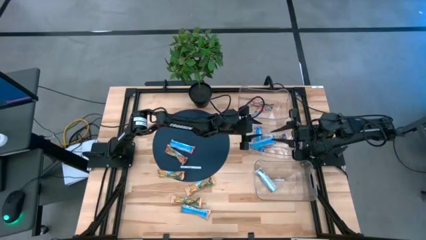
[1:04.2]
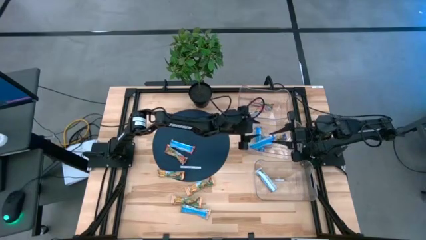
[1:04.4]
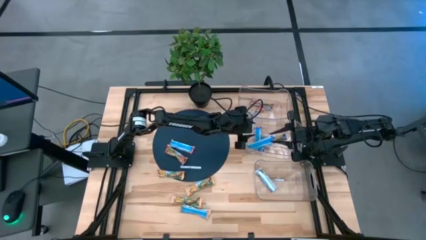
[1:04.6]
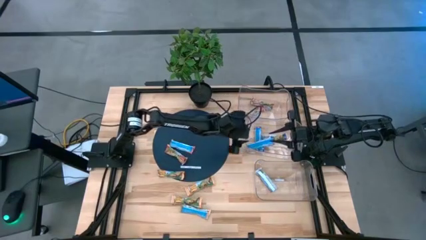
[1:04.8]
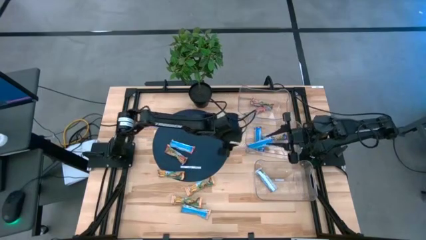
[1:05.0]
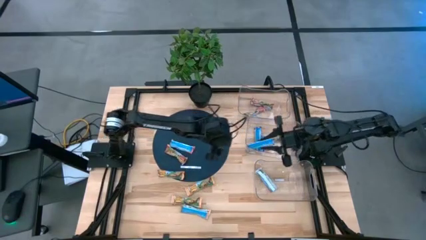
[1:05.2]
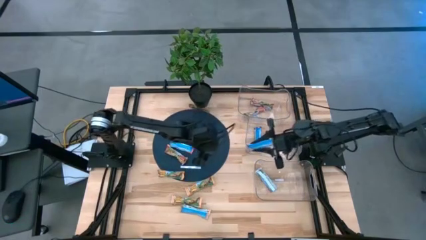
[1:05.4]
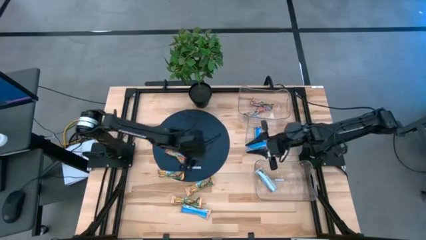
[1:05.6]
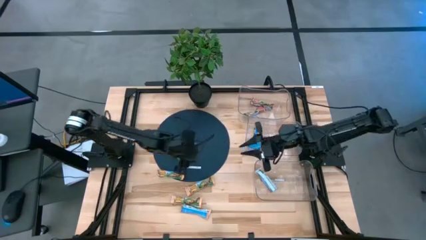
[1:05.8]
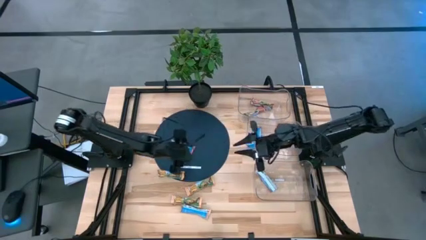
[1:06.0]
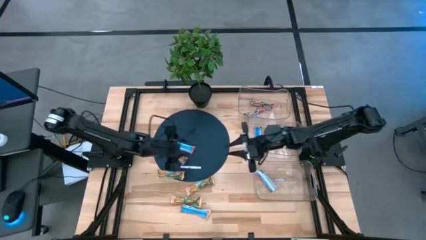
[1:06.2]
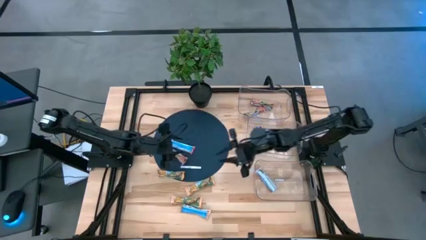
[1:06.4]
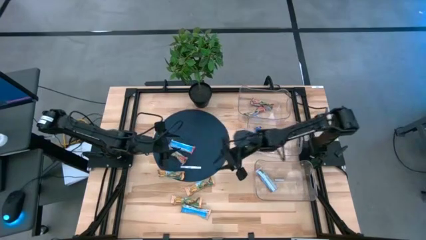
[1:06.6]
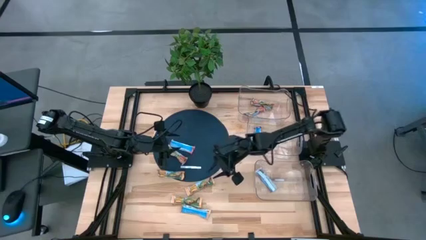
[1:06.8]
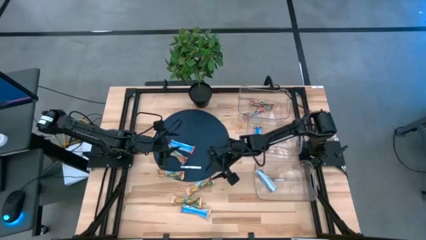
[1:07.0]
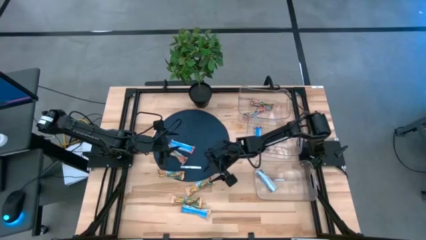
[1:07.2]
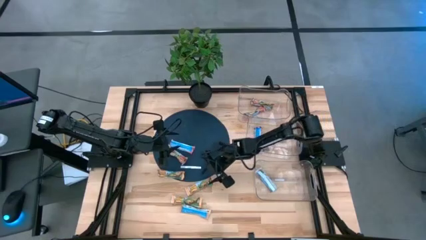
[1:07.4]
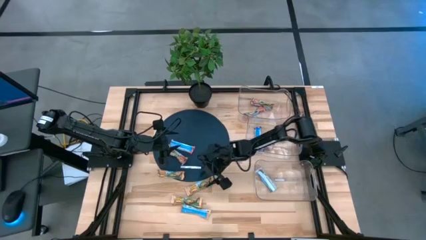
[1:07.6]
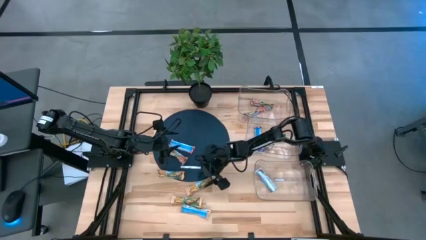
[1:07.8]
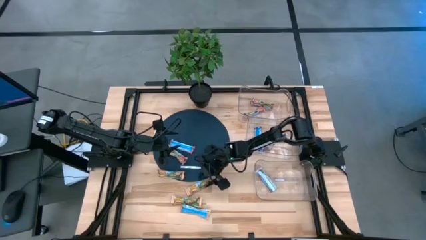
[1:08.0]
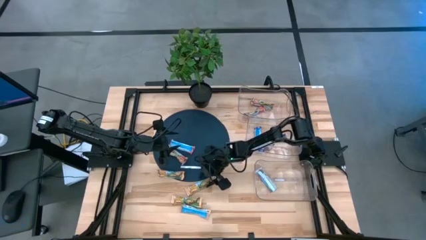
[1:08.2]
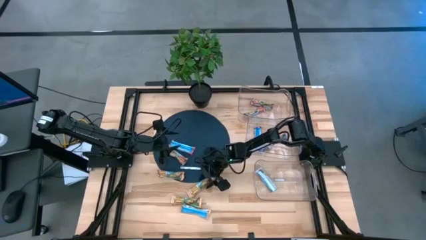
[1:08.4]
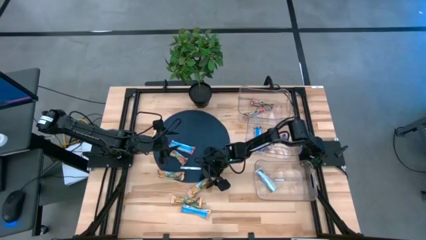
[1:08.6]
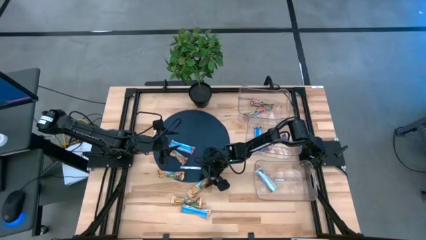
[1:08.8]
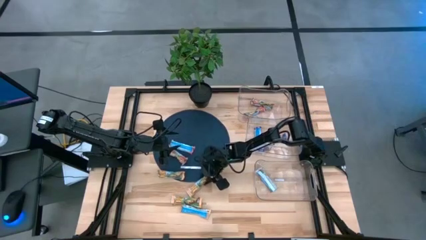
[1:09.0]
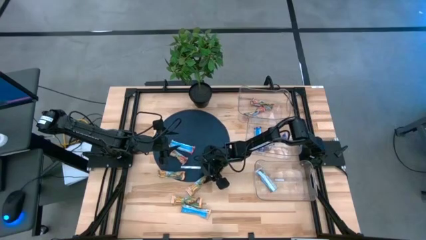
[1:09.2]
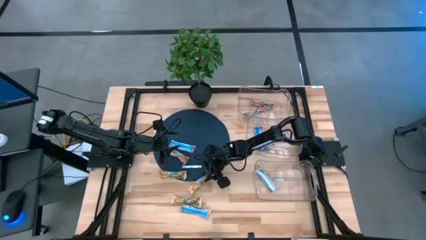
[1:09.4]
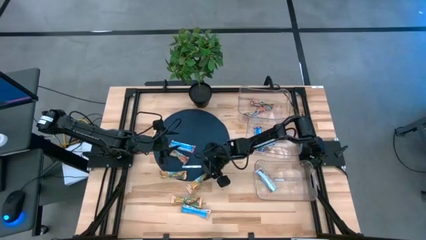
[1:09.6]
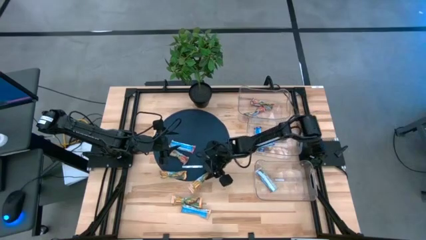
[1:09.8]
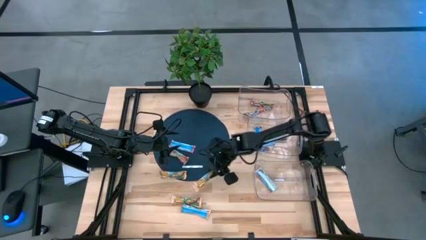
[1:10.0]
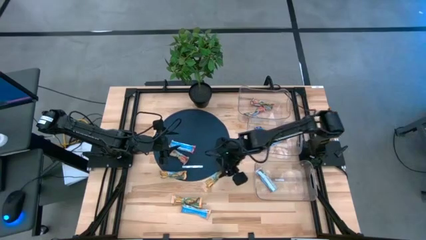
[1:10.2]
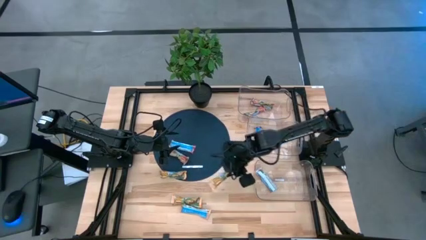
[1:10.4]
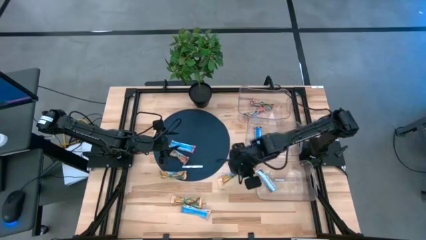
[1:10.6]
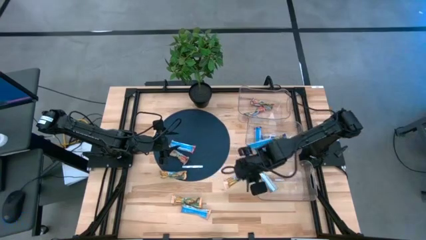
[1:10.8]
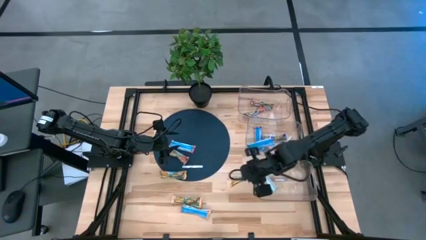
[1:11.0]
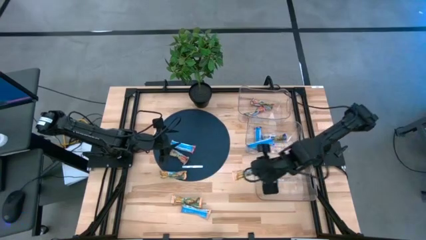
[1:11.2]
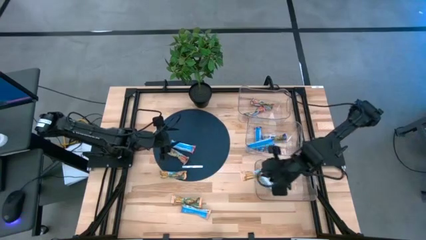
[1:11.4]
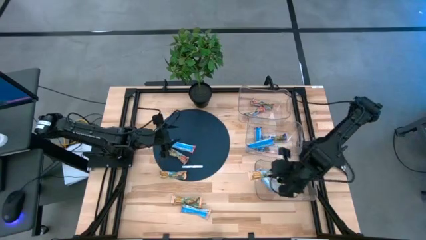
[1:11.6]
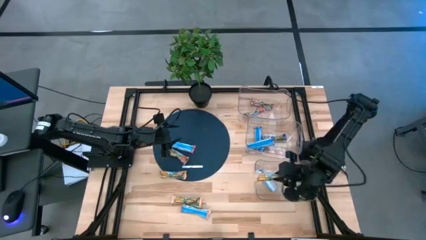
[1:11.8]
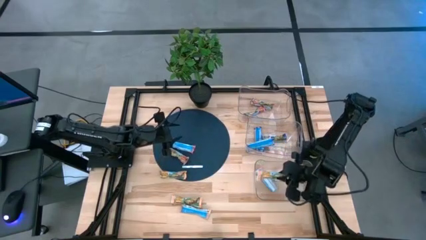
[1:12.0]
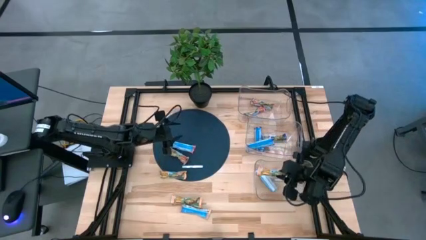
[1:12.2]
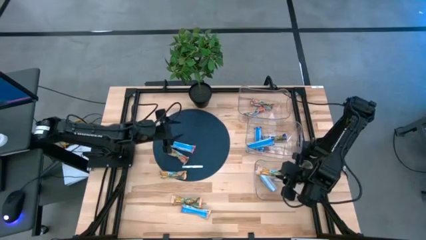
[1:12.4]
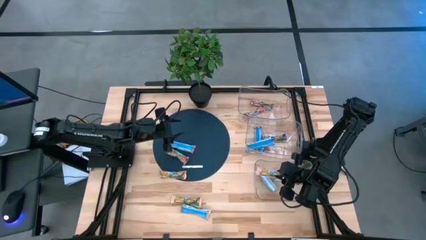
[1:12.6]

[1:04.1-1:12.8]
Task: Pick and place Granola Bars by type
Put the yellow granola bar into the bottom transparent bin

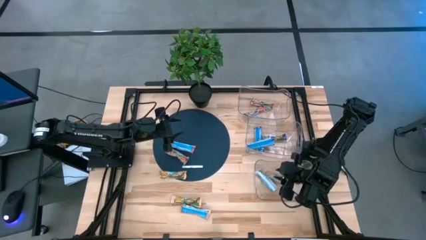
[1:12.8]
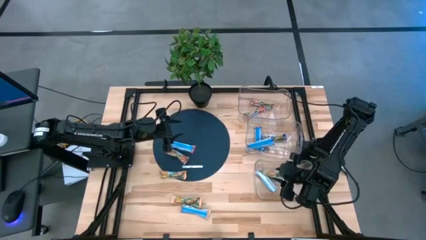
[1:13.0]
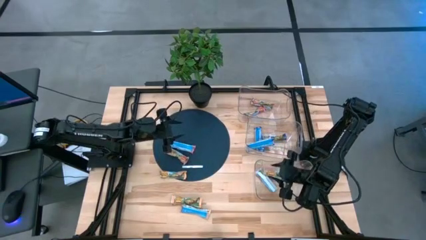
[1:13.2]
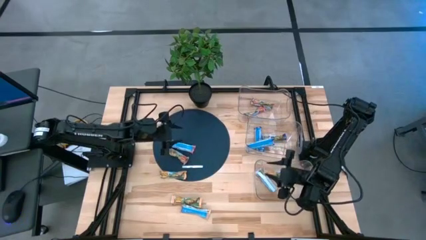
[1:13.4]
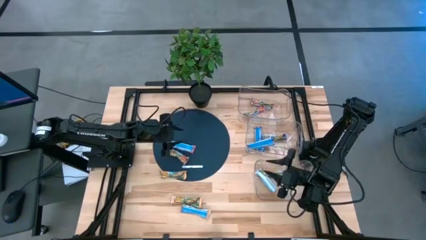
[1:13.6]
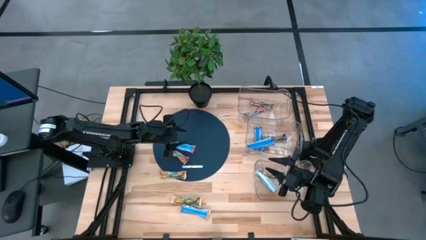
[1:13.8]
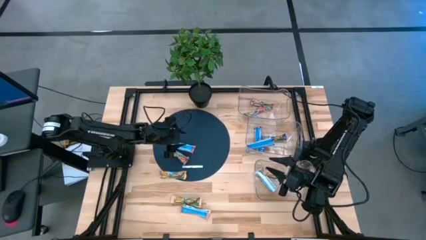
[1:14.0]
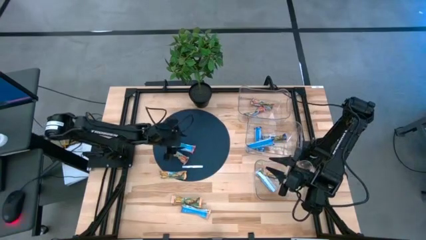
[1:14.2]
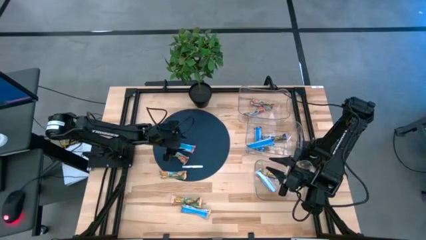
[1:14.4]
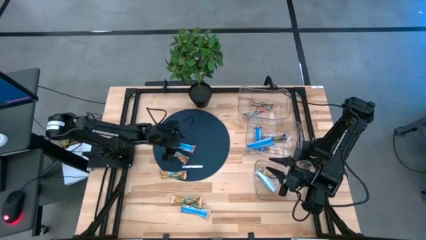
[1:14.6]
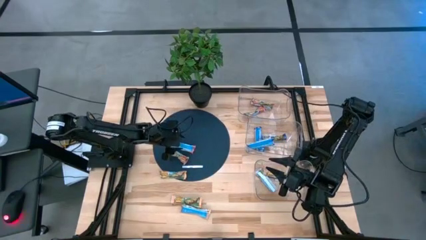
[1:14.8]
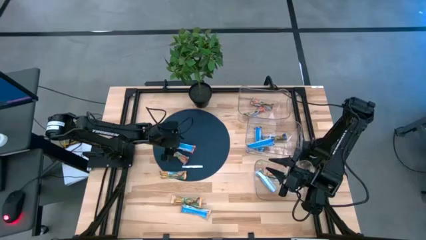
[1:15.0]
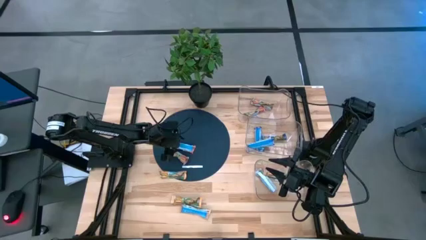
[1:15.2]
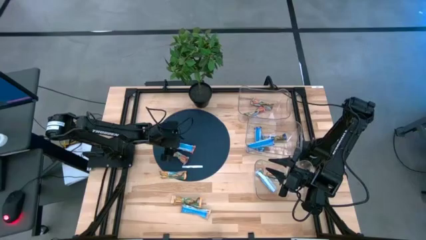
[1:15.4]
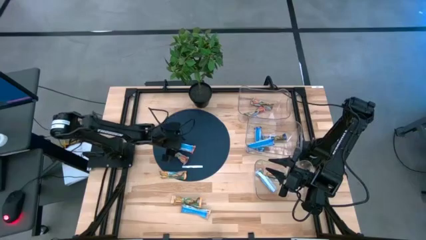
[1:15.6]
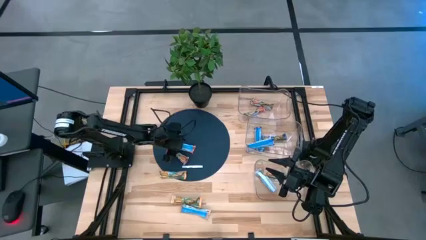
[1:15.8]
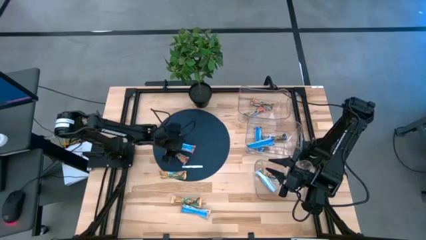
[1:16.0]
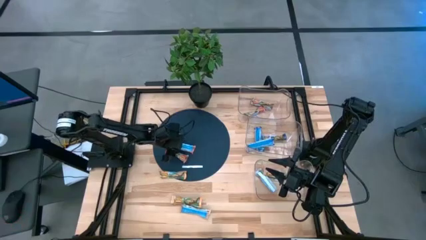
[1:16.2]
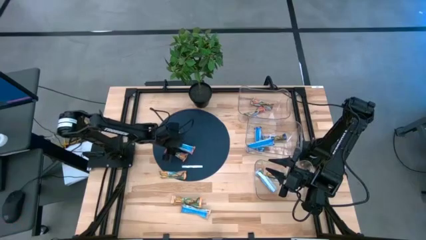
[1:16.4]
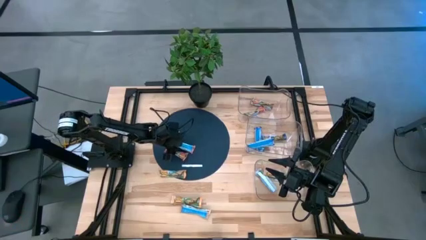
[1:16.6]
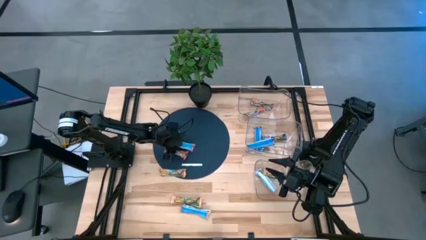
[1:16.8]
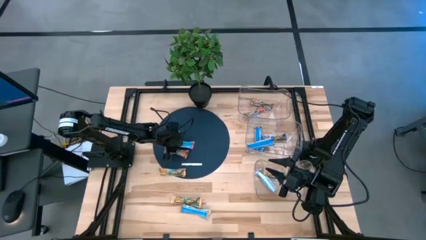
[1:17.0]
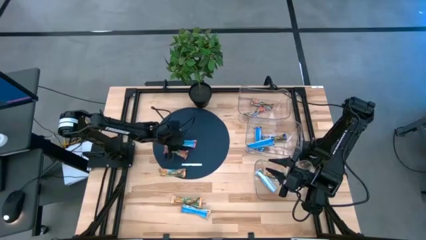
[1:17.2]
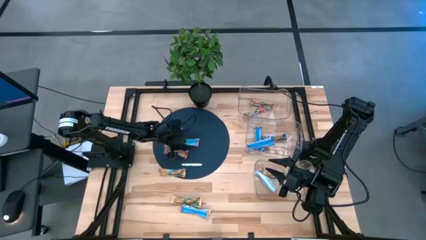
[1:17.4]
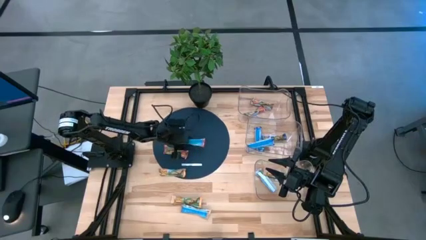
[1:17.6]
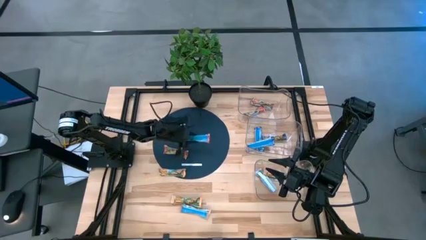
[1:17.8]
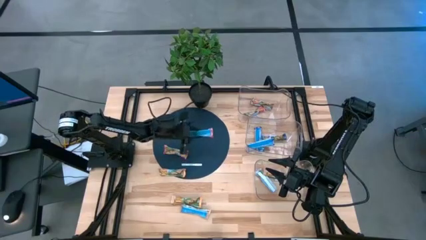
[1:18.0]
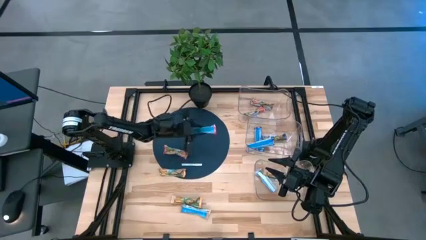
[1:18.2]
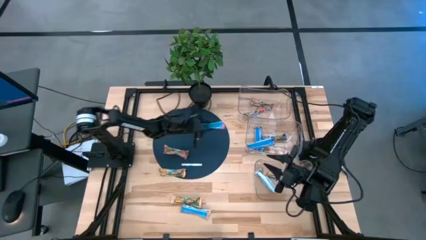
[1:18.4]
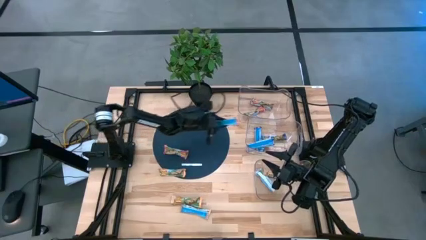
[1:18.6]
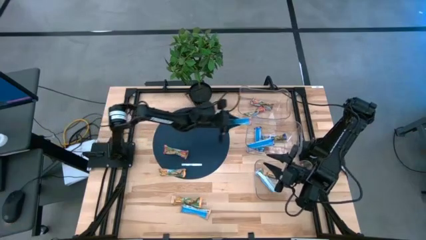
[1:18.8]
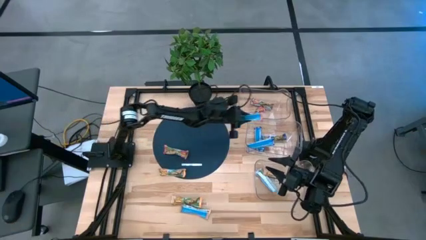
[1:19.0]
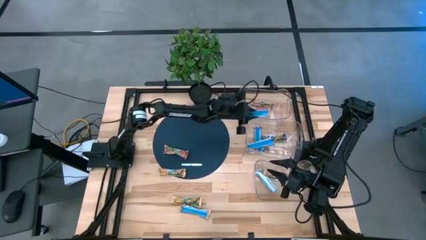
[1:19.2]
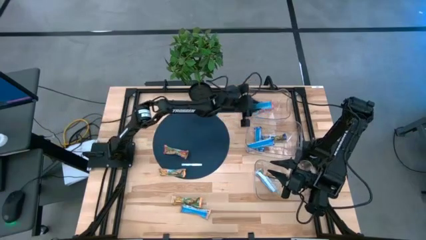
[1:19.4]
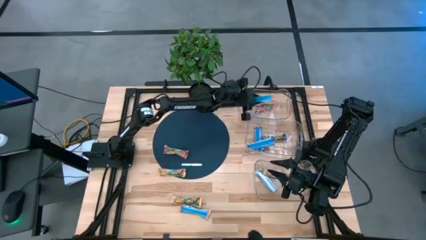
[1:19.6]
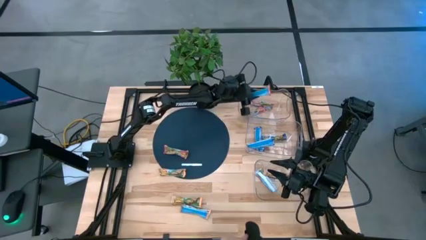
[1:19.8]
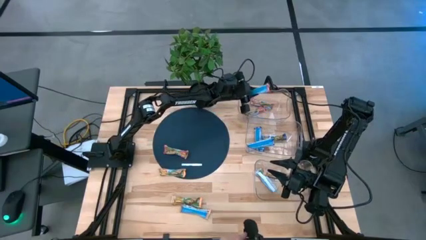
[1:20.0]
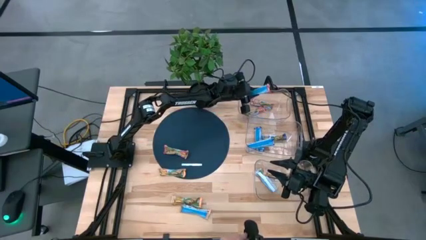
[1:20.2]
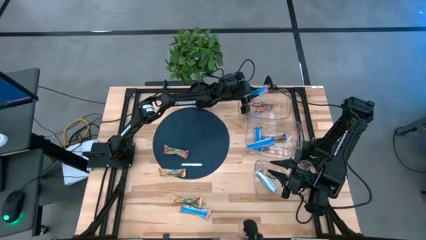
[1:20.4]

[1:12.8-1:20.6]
Put the red granola bar into the top transparent bin
